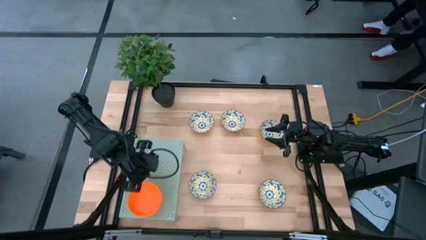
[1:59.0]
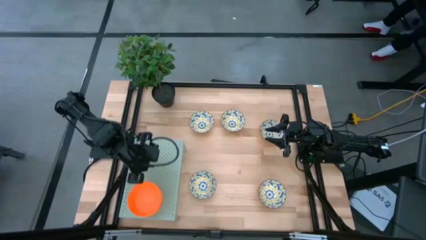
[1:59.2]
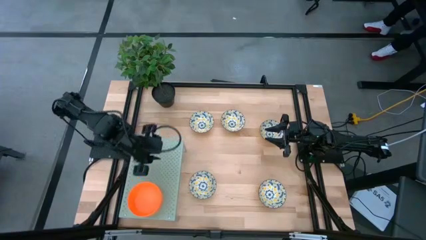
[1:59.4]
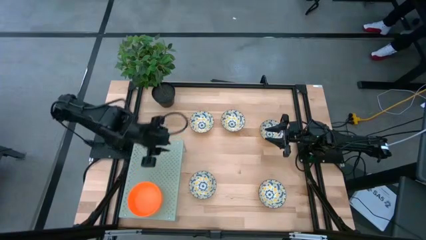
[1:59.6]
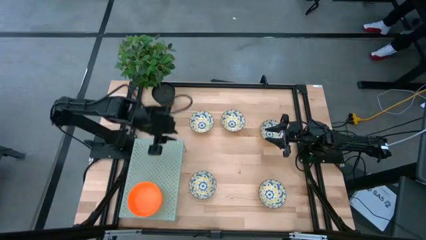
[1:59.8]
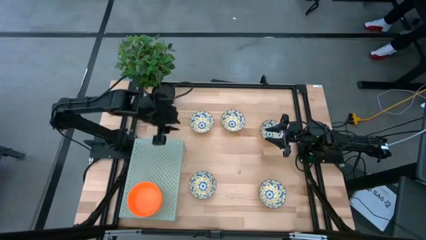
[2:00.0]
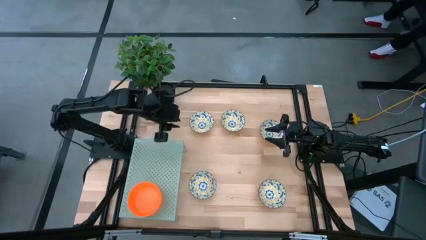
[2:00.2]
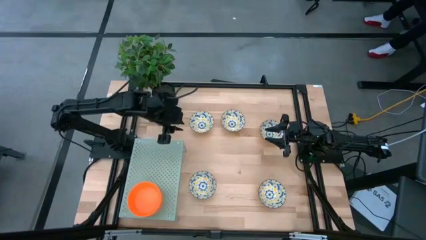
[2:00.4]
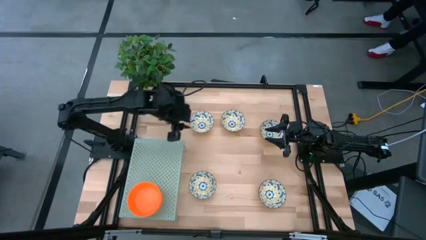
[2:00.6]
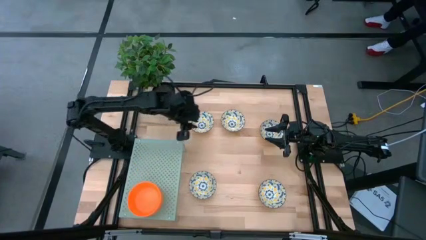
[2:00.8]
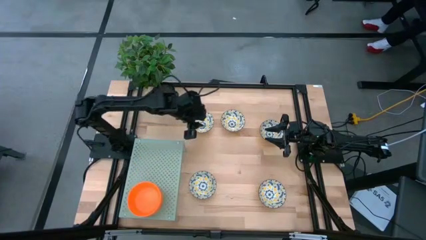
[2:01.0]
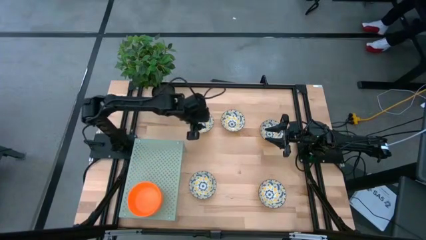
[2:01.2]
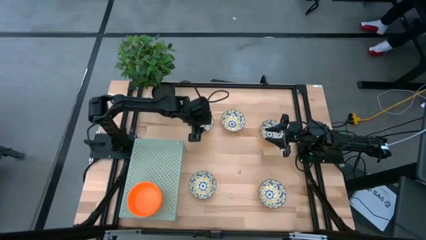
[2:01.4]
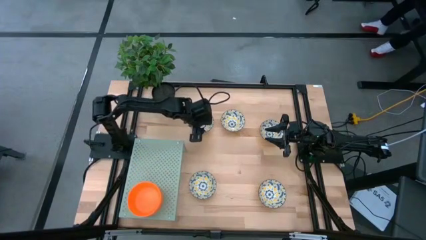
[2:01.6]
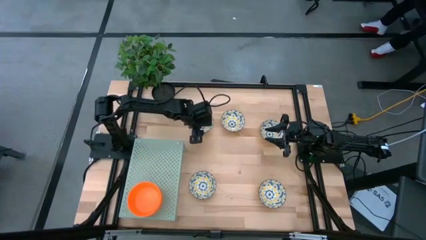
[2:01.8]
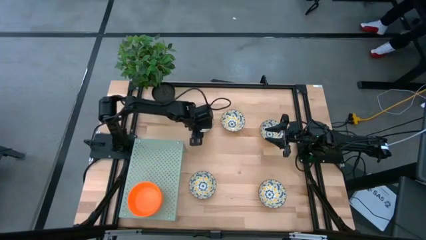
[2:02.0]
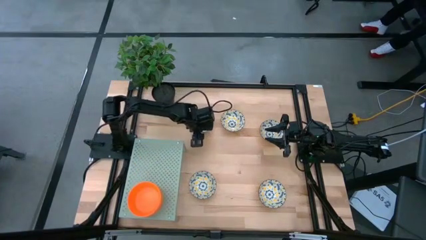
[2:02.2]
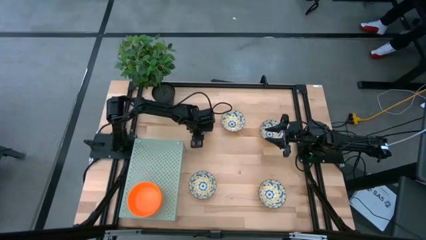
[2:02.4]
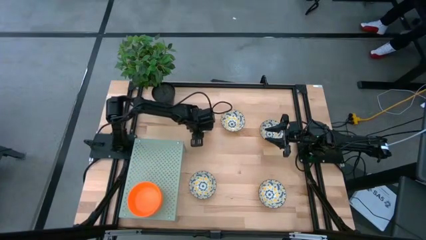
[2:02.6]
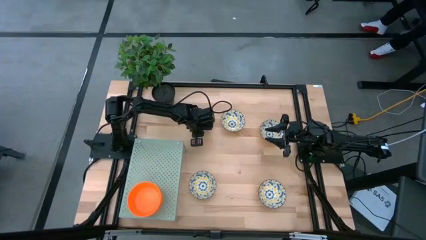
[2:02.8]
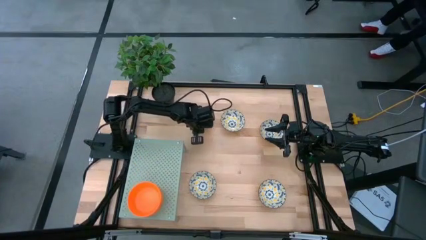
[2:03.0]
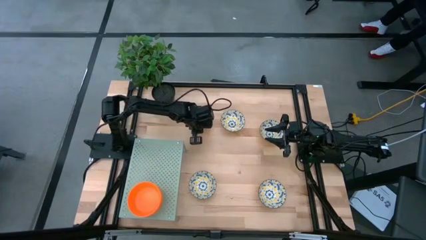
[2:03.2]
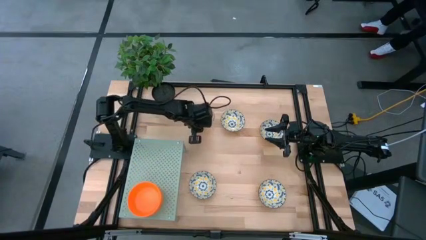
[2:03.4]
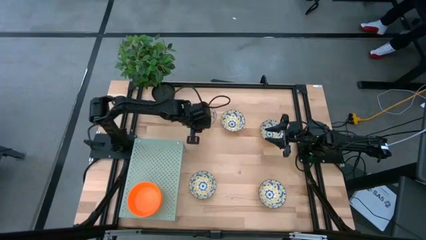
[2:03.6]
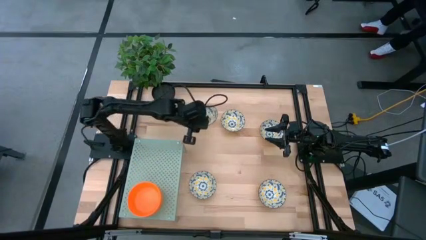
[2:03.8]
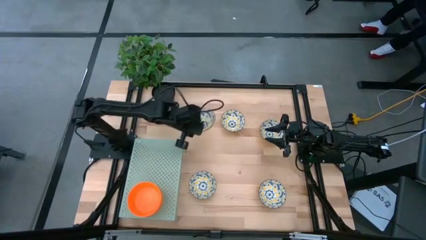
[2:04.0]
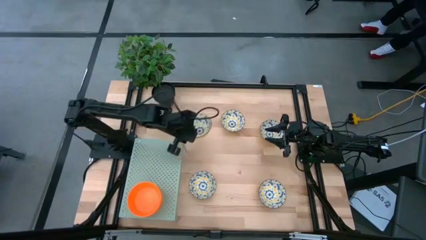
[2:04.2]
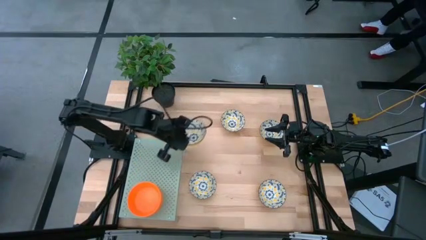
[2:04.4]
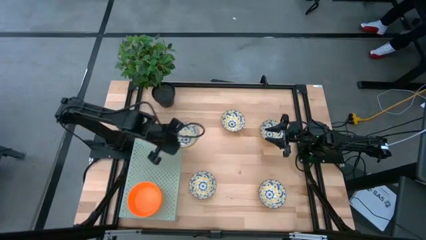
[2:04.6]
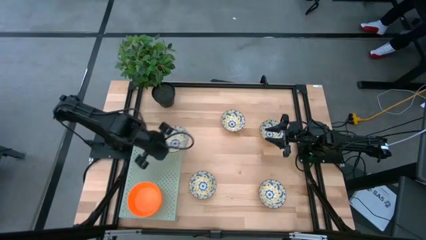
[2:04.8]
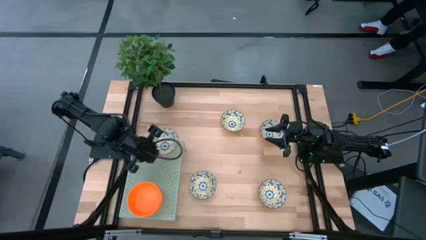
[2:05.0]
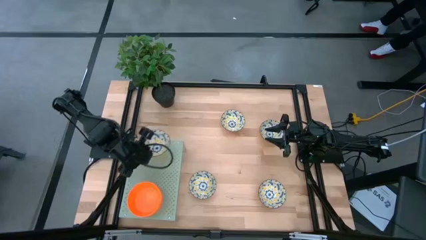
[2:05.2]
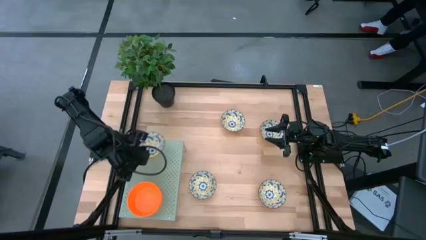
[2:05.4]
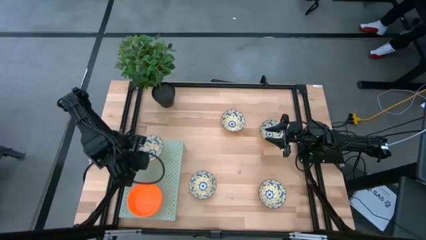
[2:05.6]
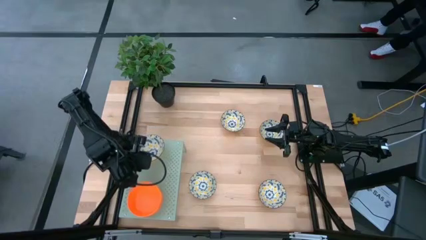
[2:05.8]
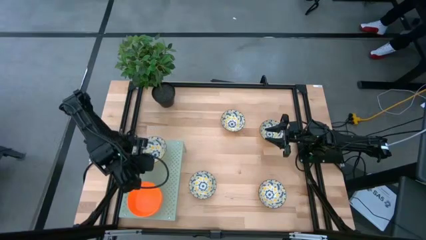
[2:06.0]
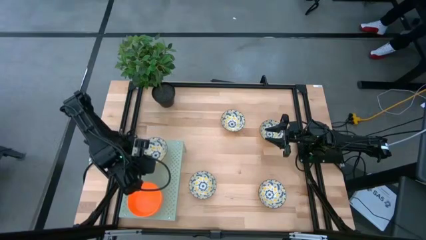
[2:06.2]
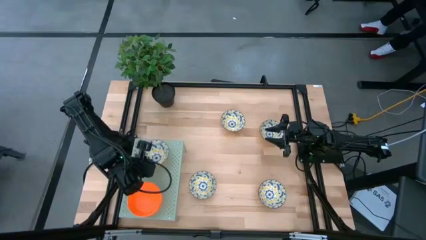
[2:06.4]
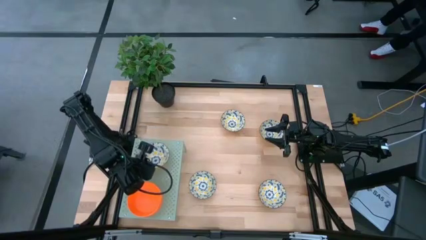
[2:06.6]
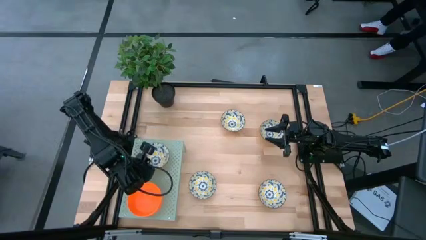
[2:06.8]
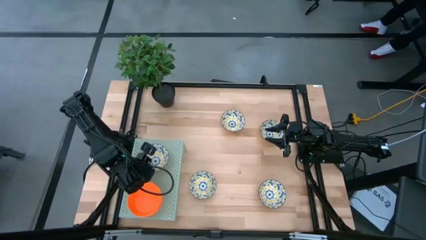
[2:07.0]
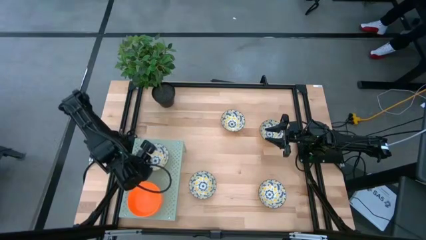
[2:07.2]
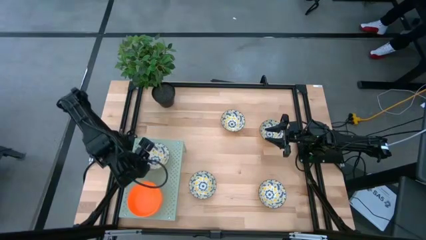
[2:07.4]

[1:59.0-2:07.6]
Task: Pick & Place Mini bowls
Put the patterned bowl on the shelf

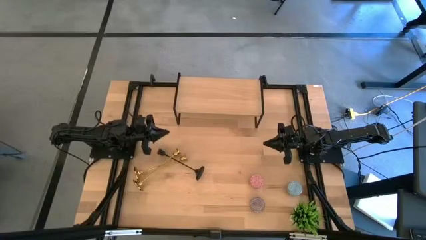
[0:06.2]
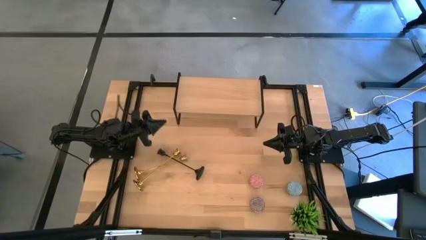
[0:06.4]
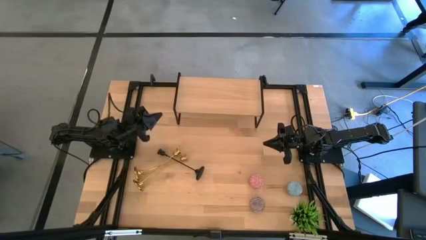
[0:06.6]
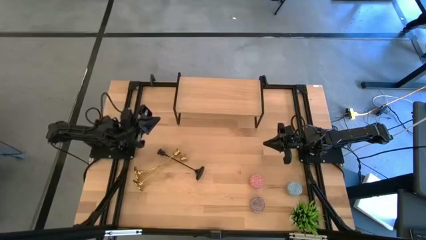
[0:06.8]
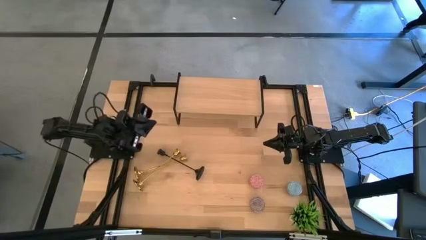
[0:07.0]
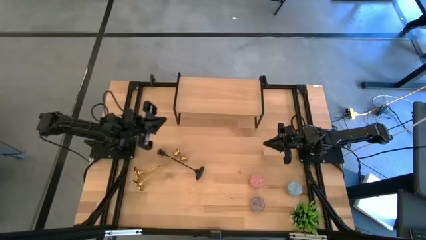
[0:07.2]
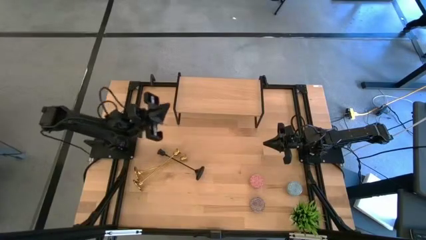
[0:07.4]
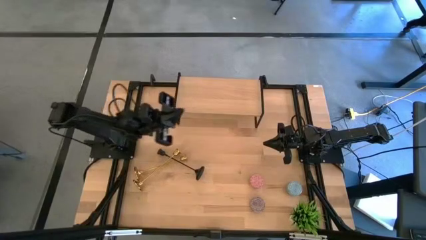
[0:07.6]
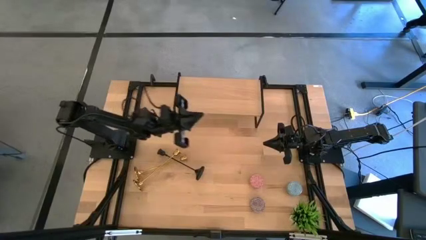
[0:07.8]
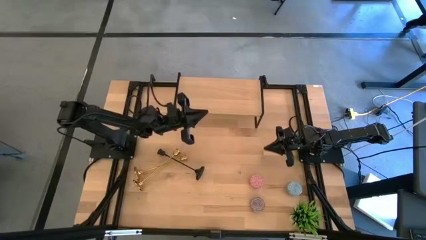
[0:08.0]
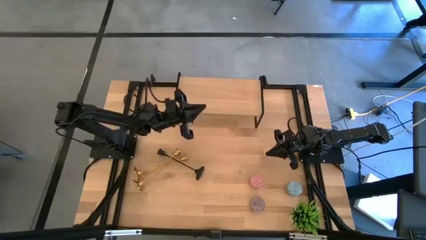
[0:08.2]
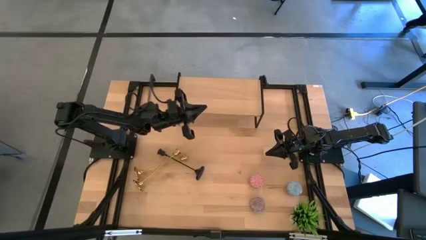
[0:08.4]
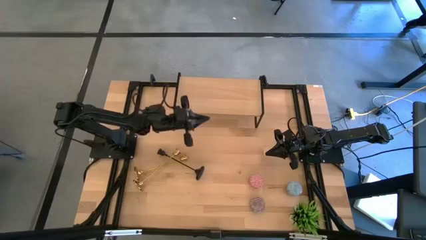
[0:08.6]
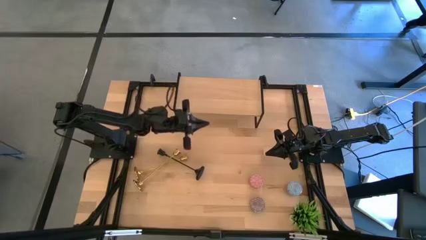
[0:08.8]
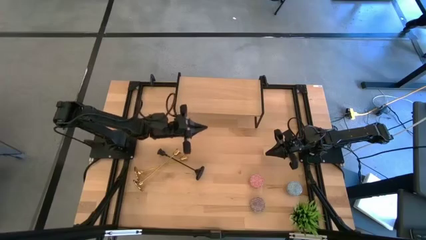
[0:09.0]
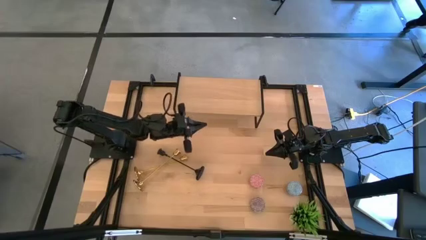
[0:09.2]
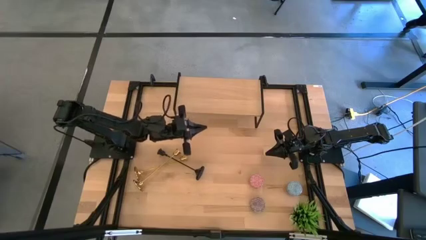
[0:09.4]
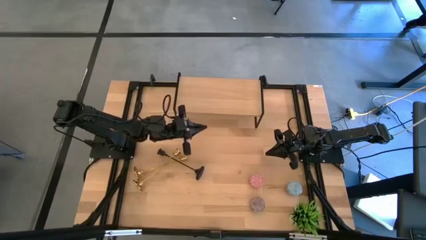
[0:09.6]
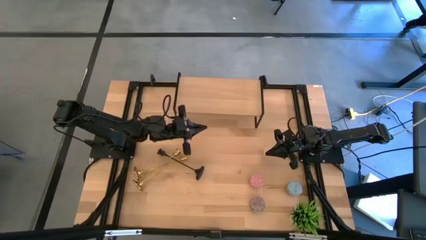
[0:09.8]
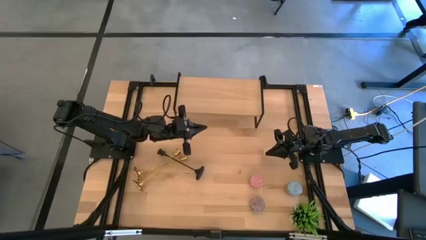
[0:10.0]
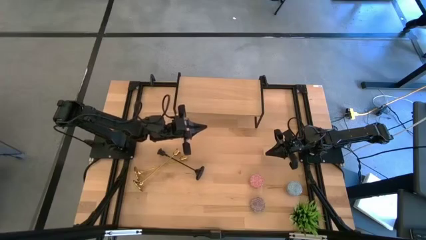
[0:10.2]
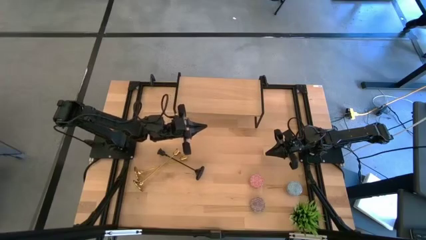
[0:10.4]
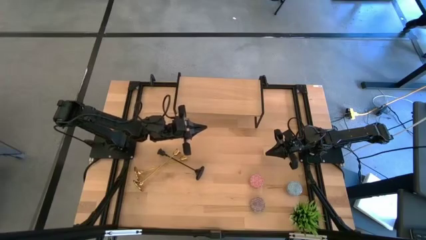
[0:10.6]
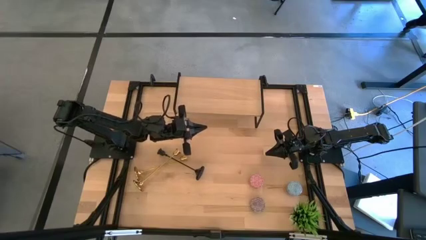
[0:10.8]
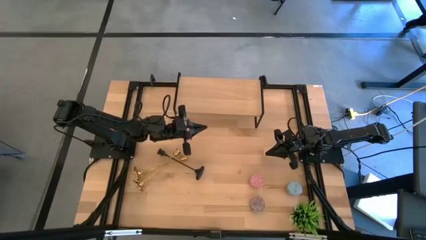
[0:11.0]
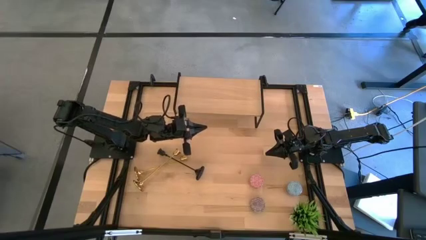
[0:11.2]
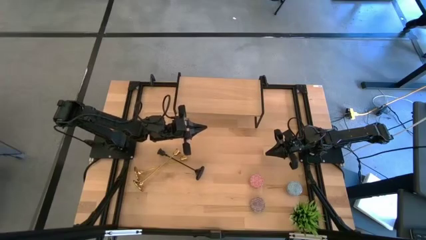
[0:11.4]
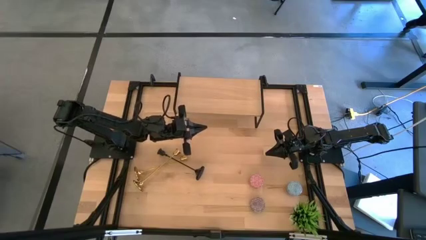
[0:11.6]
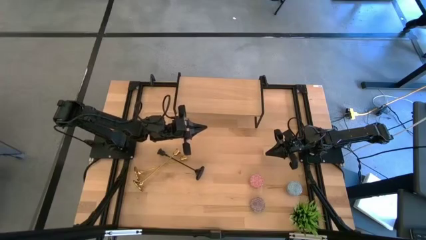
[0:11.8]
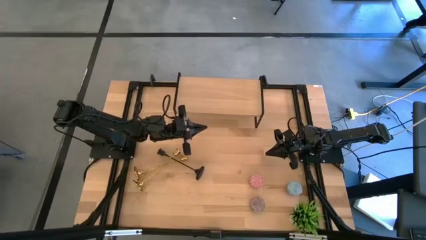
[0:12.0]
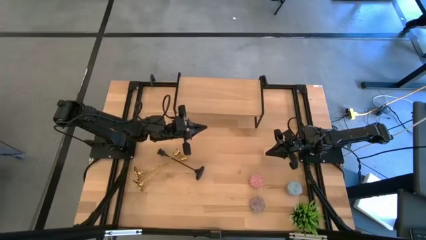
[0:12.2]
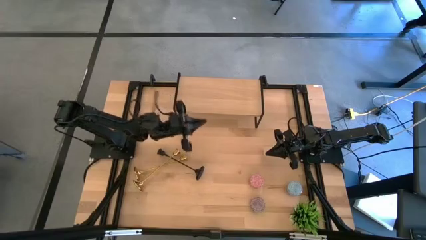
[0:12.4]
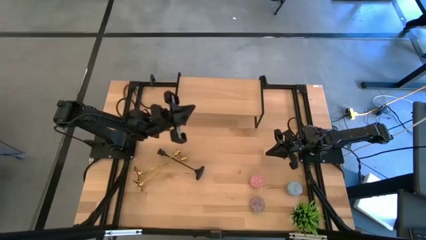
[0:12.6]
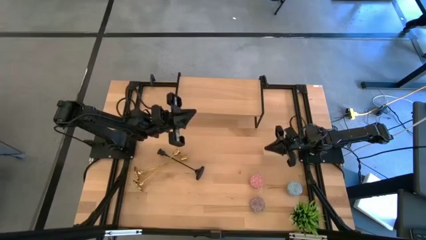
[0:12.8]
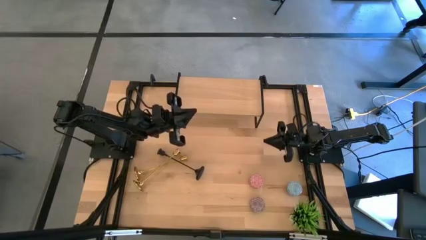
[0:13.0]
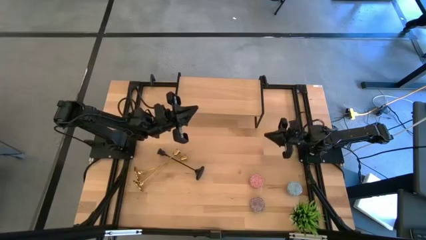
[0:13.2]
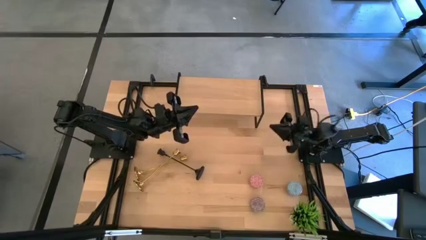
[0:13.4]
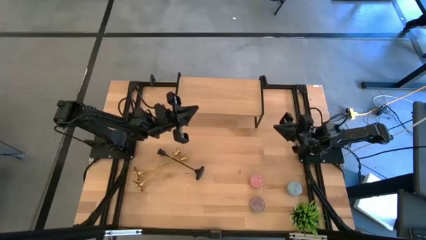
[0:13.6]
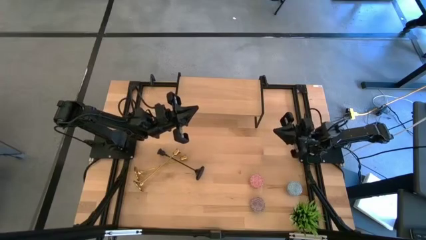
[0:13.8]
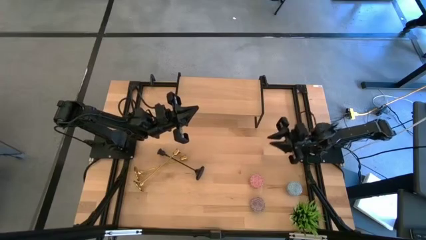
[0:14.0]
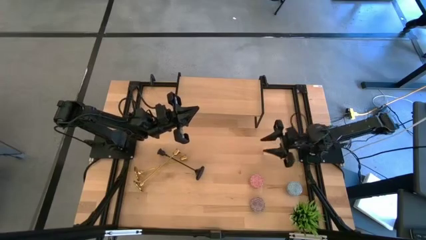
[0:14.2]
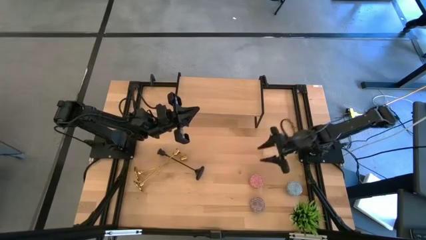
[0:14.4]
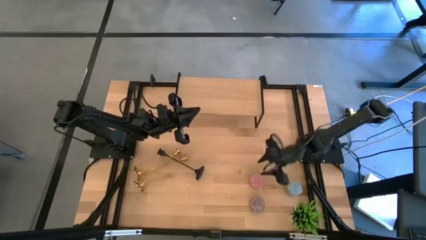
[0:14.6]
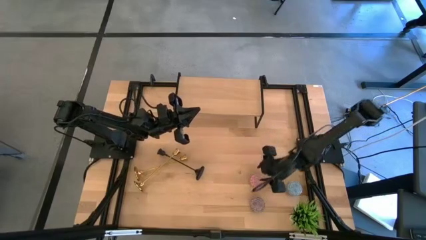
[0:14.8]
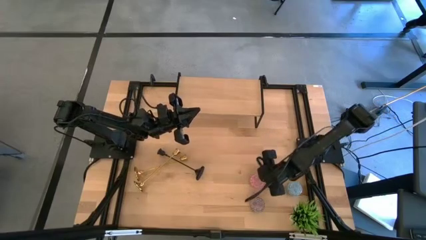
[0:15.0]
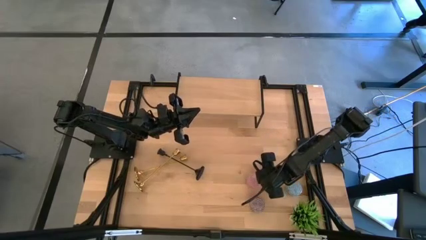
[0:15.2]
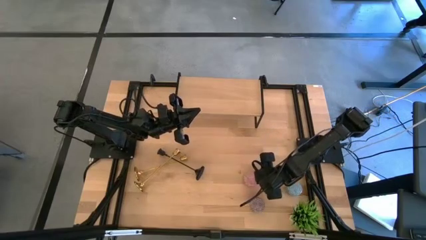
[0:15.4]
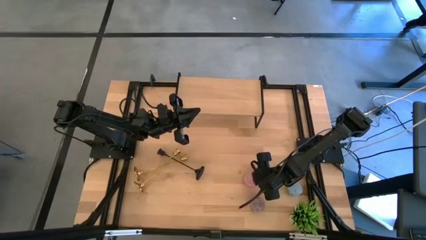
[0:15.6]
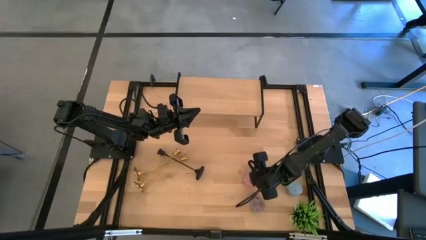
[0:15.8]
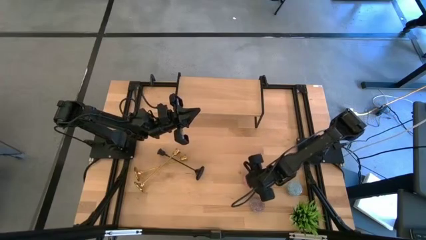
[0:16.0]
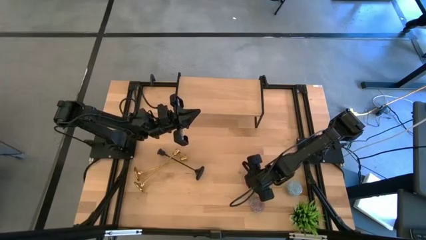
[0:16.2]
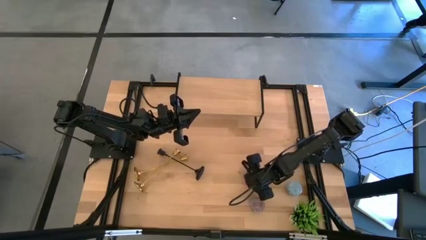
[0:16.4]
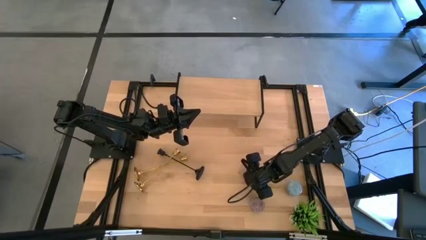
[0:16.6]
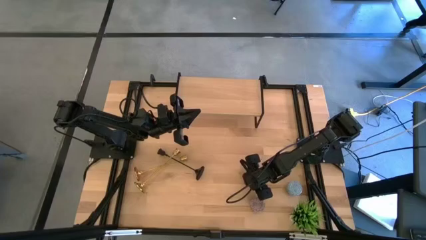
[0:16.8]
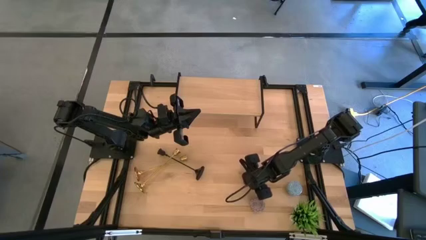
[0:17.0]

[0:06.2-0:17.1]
Task: Pick & Place candle stick holders
Put the pink scented candle on the shelf
